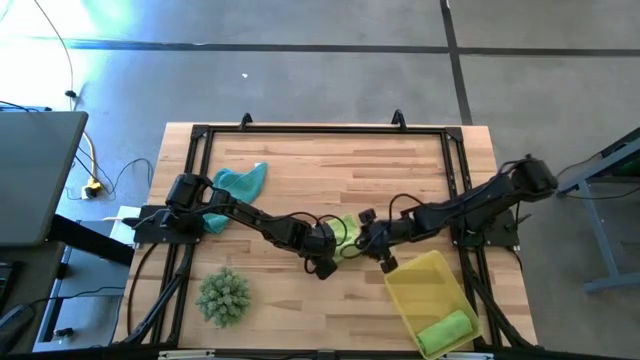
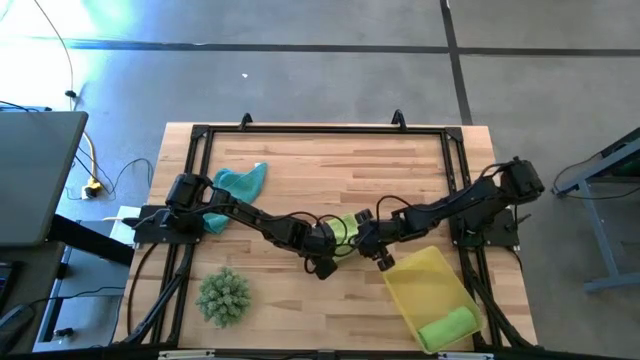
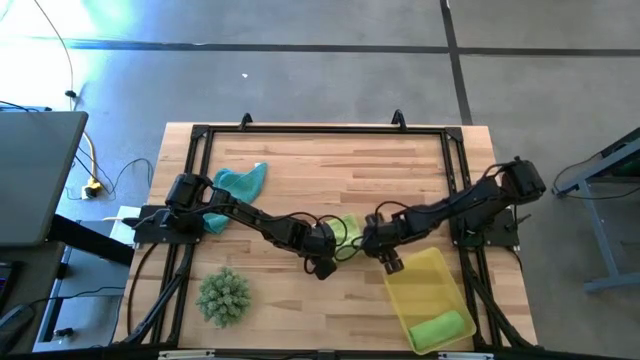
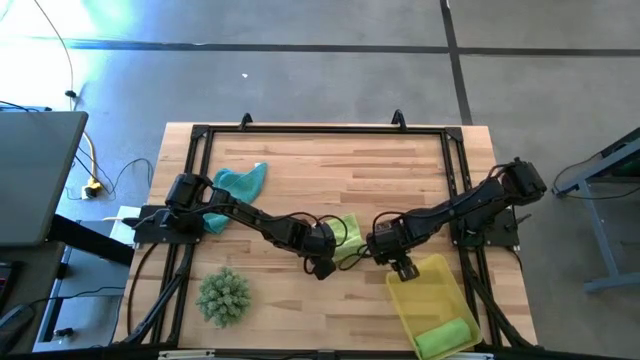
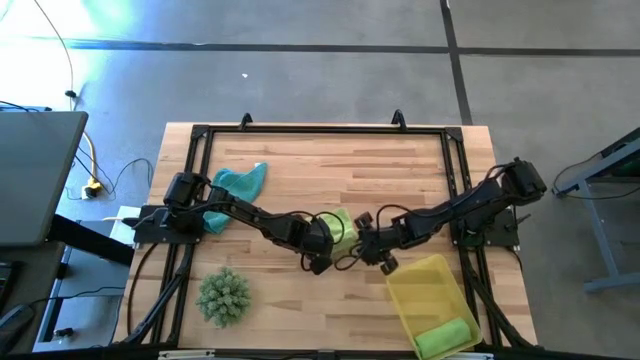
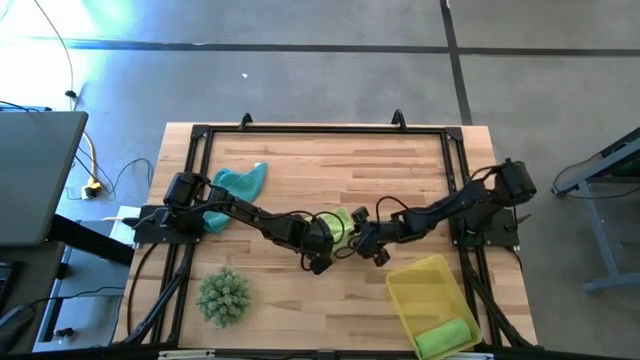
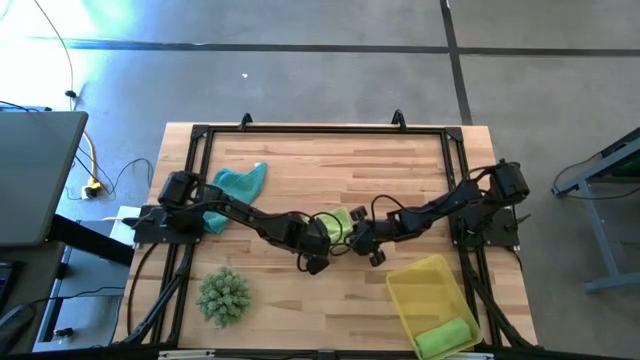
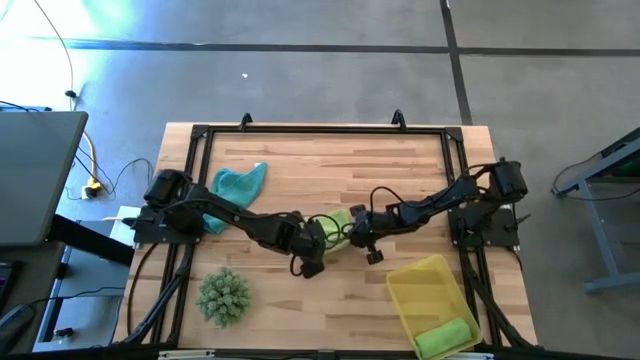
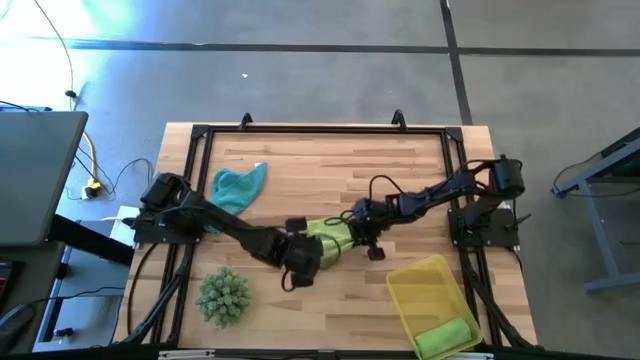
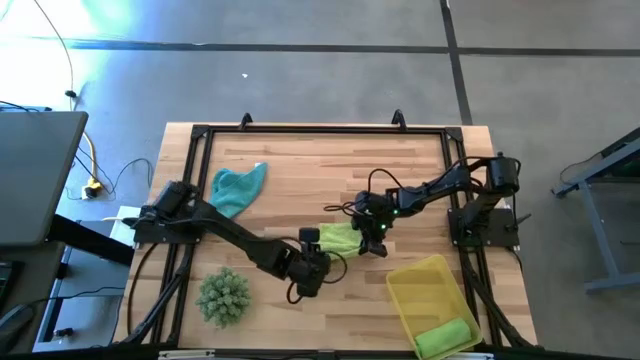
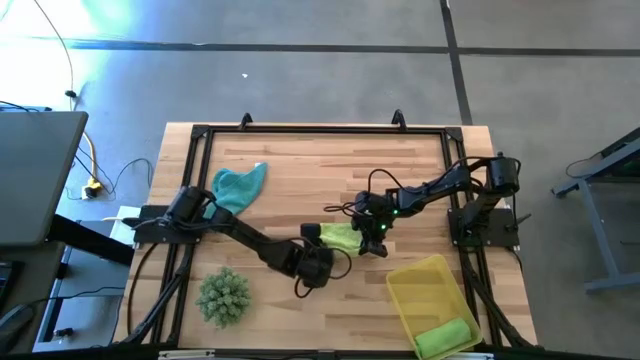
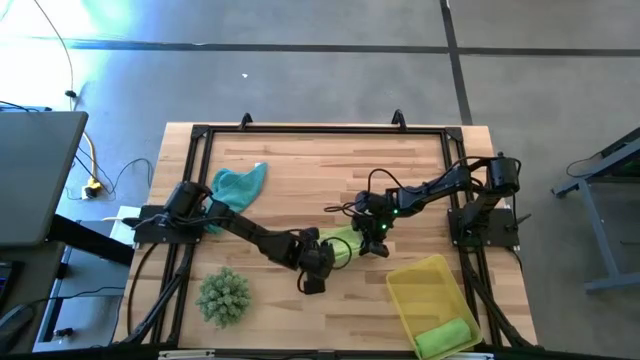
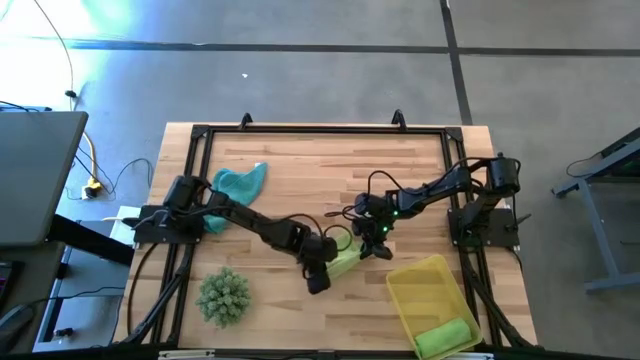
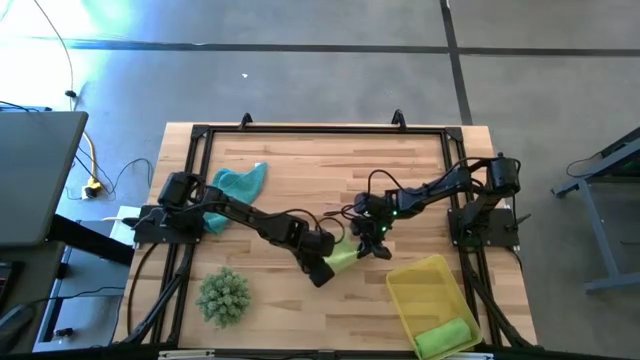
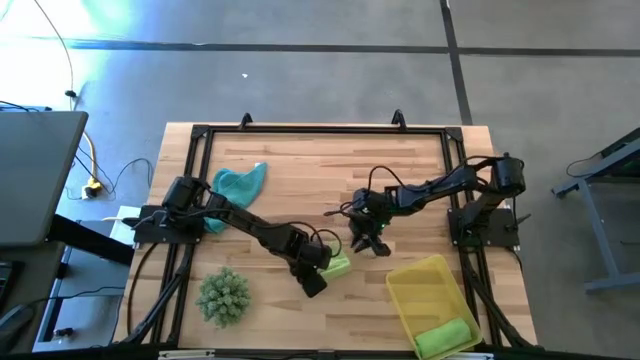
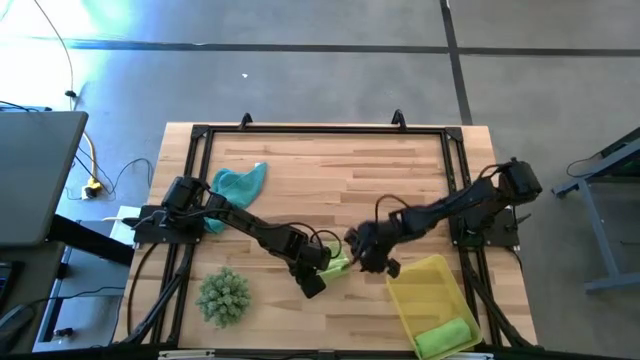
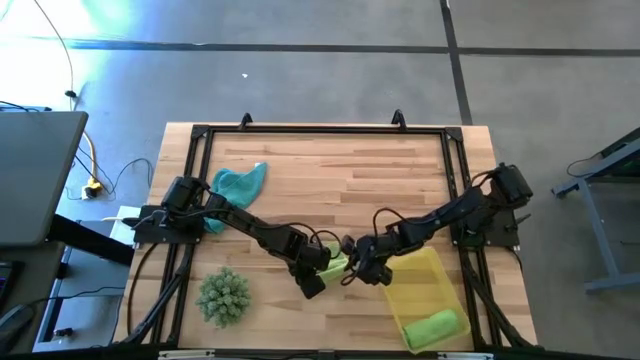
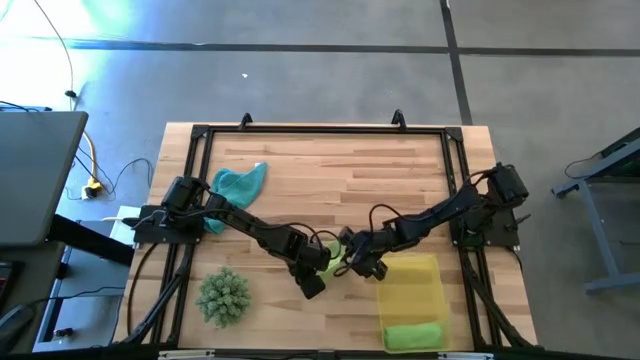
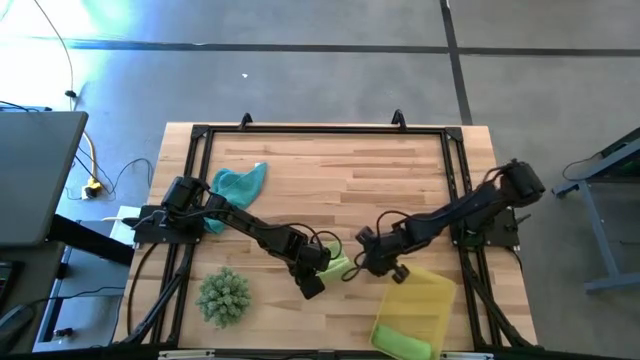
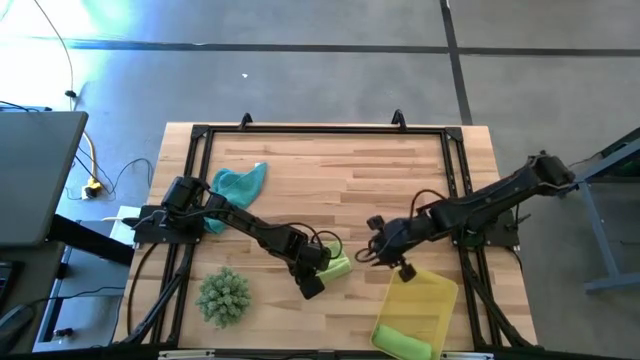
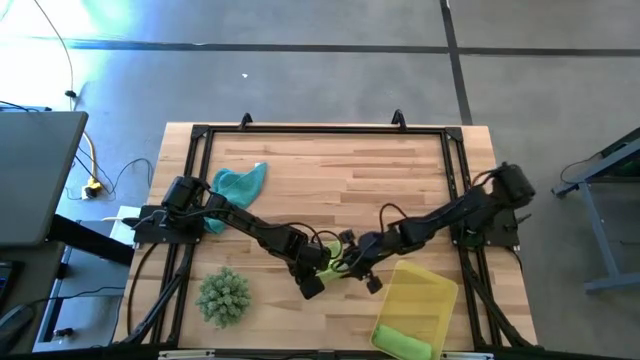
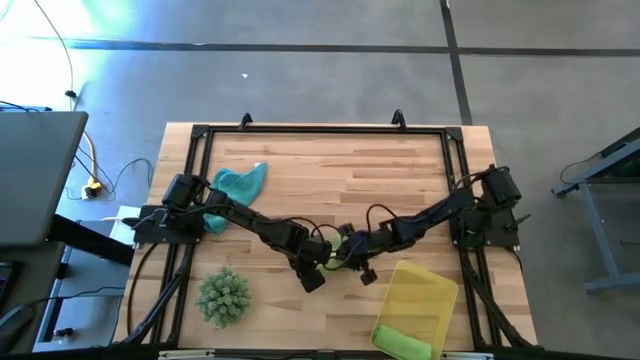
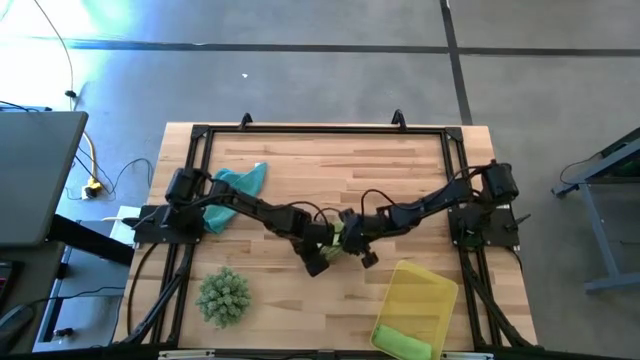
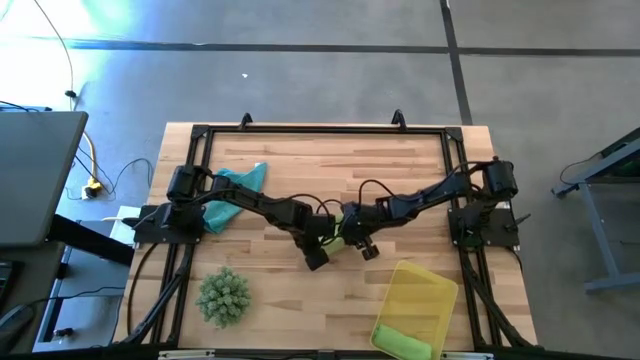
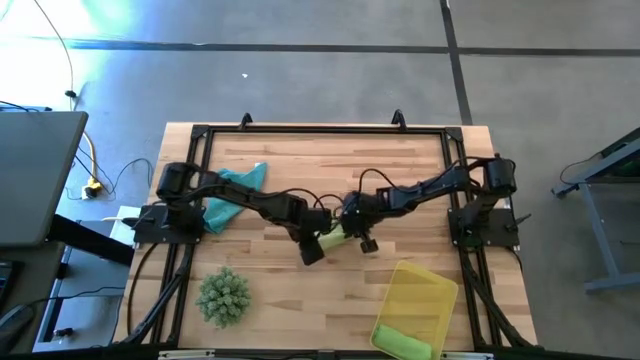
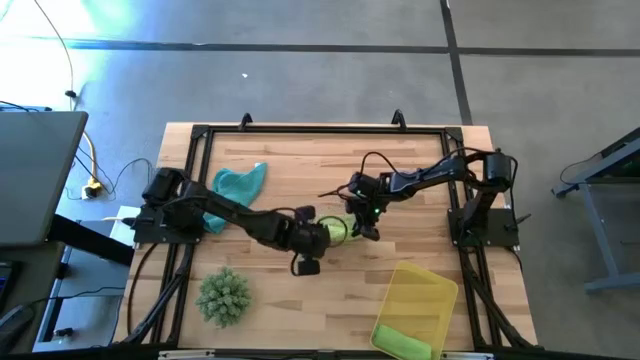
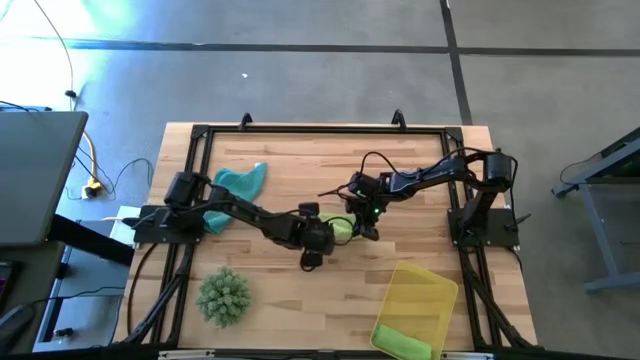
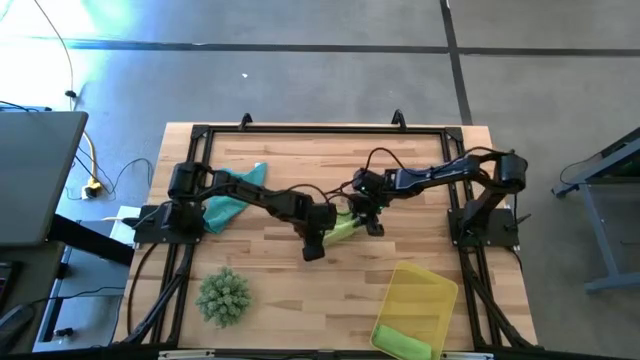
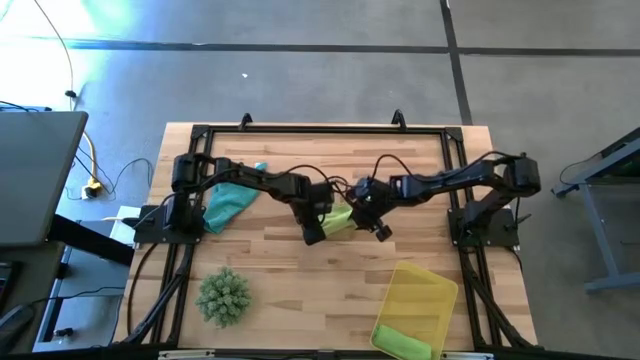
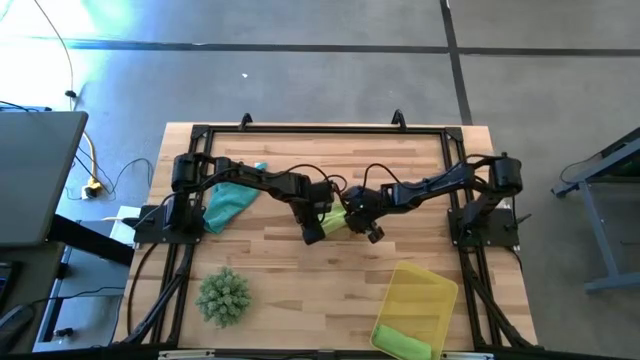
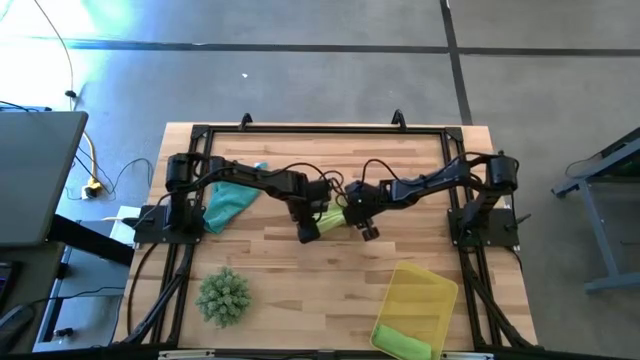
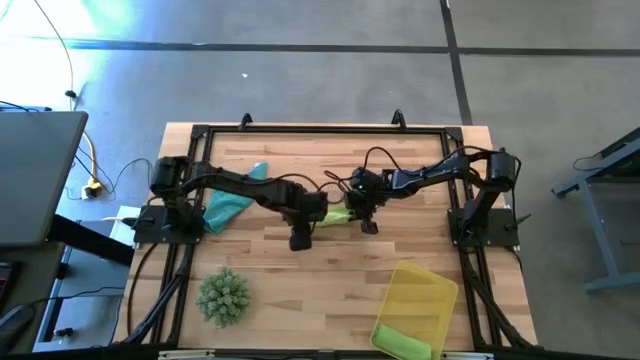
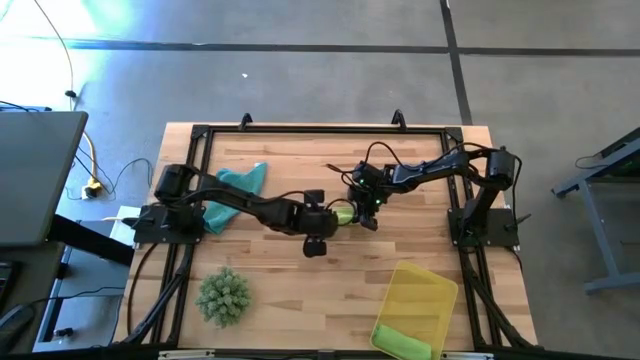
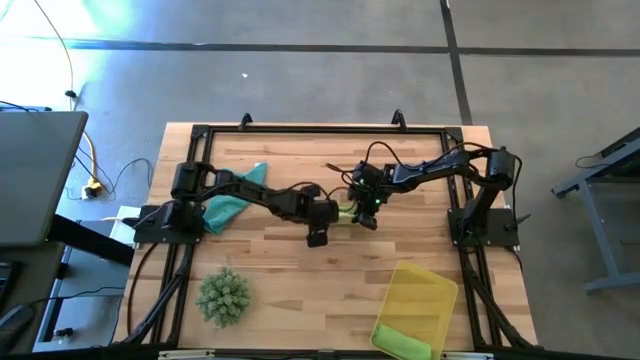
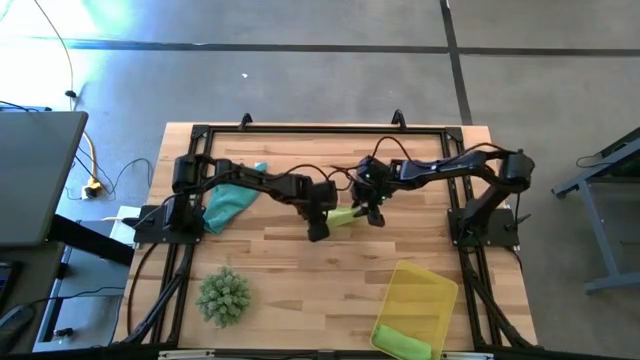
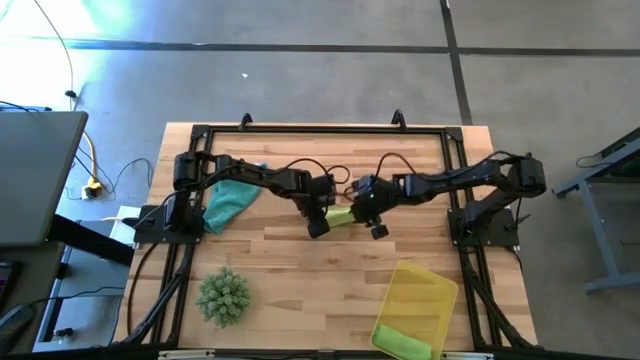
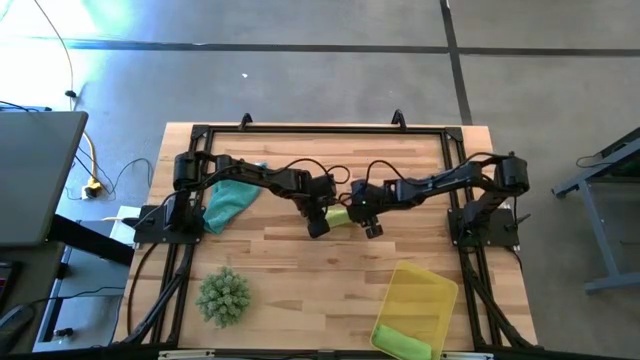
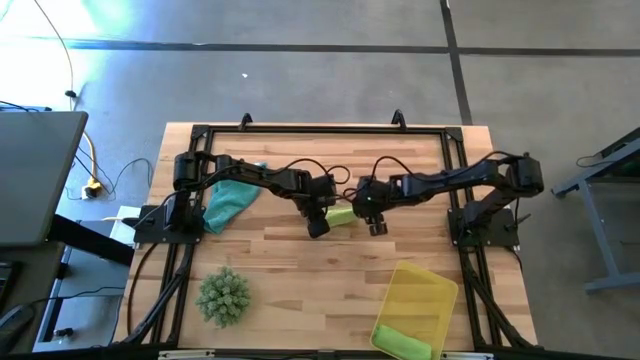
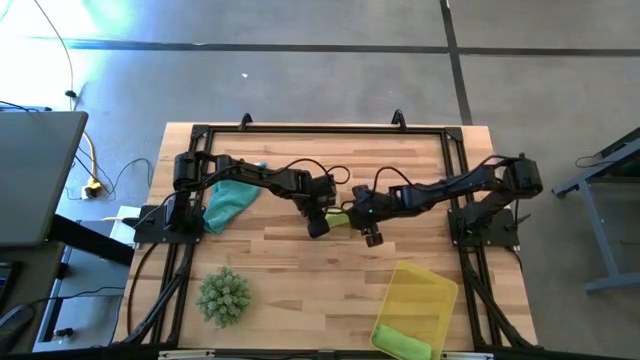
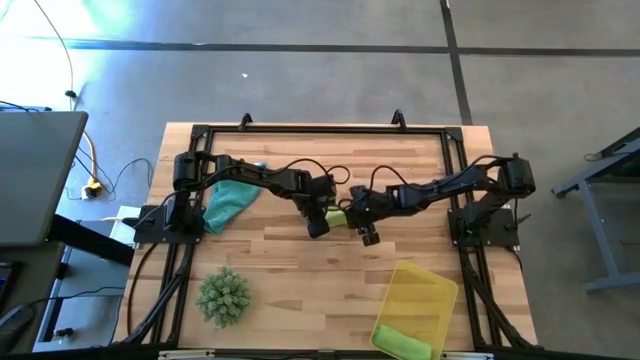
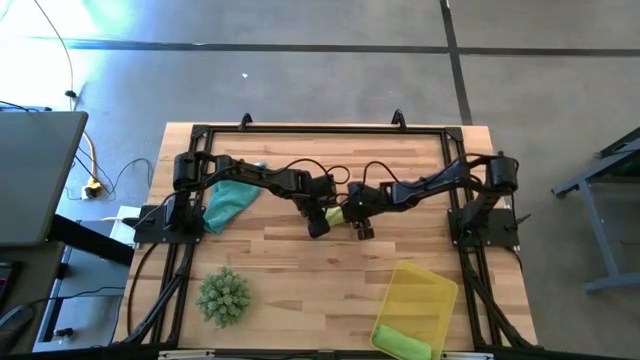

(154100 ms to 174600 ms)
Task: Roll microfiber towels into tight, uniform cylinder then place into a basket
Roll the light green microfiber cloth
